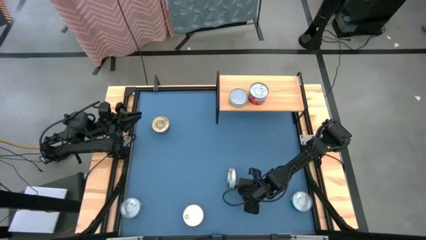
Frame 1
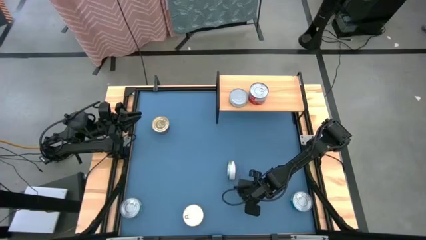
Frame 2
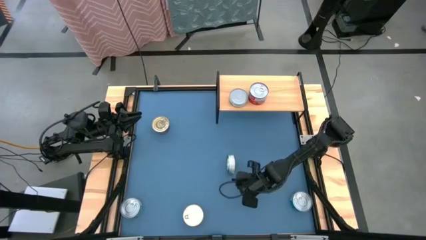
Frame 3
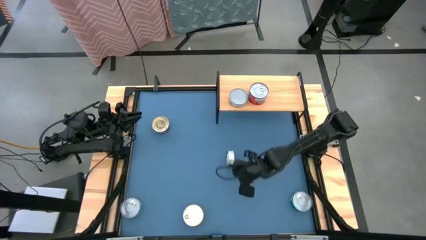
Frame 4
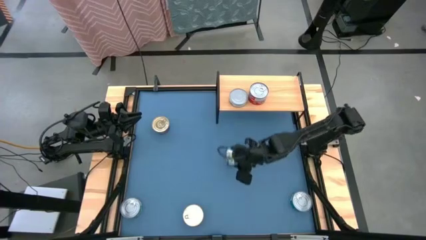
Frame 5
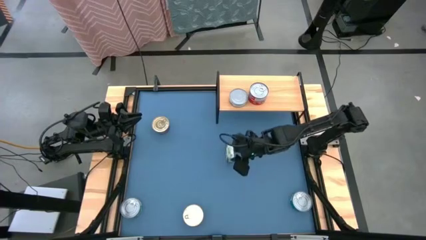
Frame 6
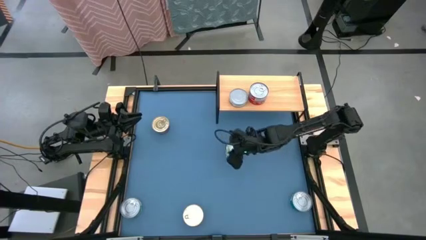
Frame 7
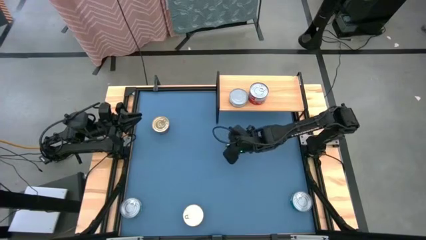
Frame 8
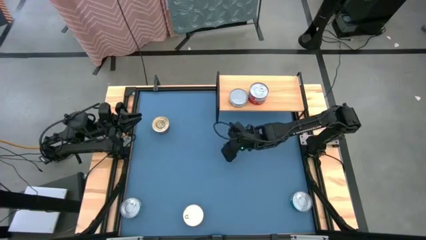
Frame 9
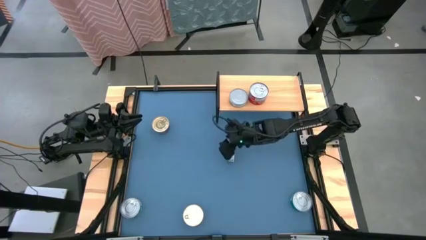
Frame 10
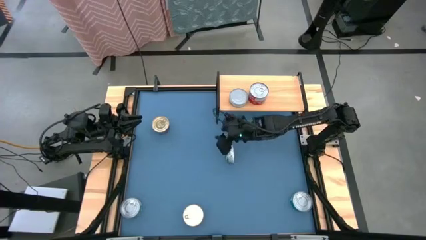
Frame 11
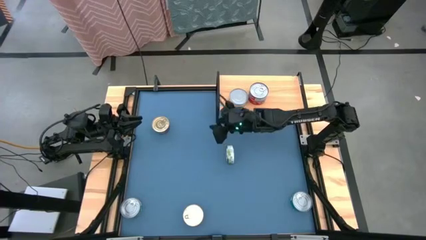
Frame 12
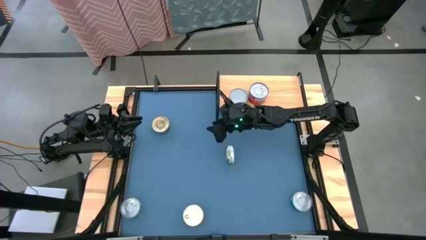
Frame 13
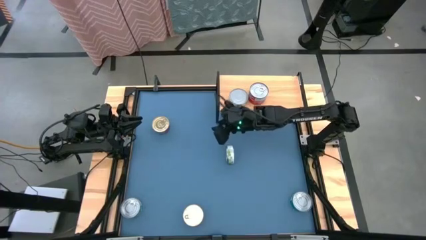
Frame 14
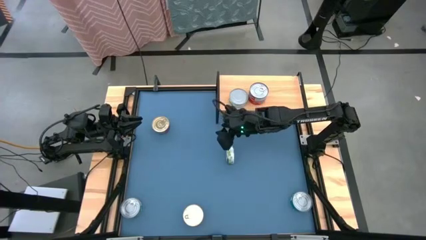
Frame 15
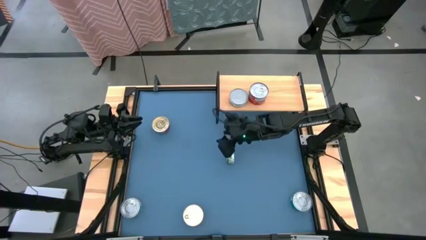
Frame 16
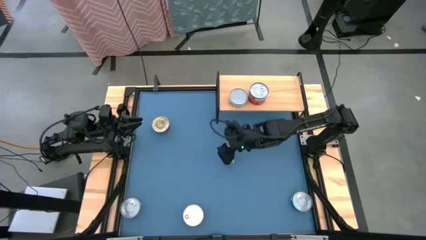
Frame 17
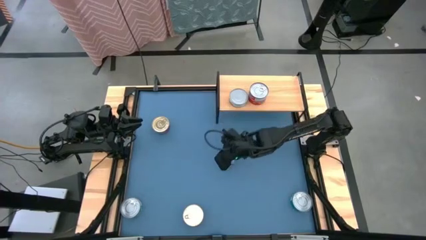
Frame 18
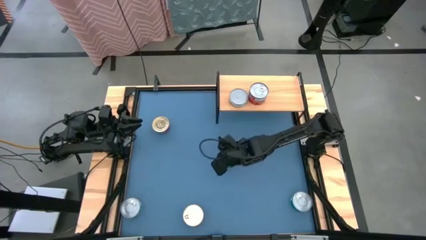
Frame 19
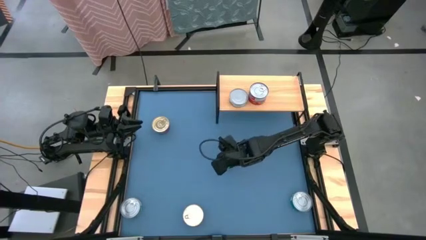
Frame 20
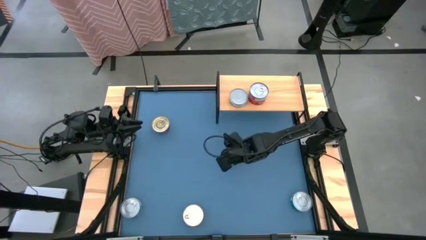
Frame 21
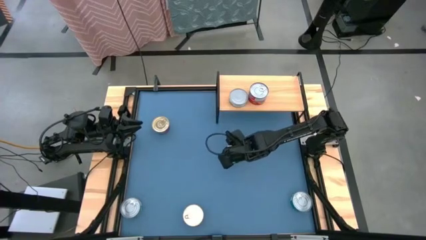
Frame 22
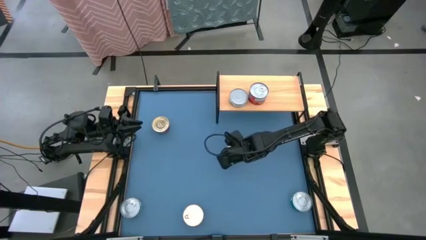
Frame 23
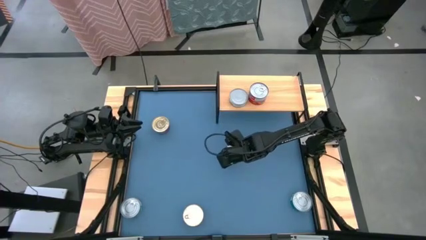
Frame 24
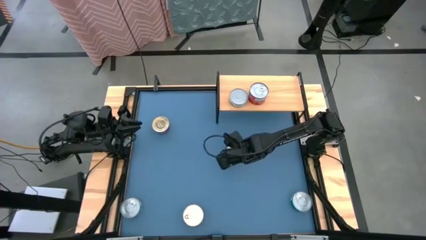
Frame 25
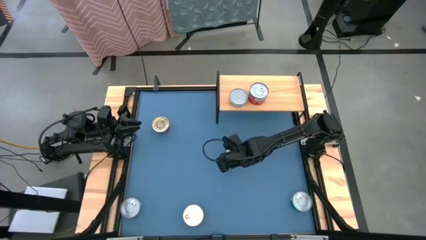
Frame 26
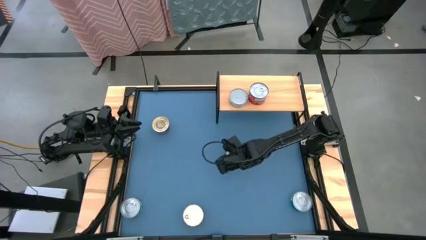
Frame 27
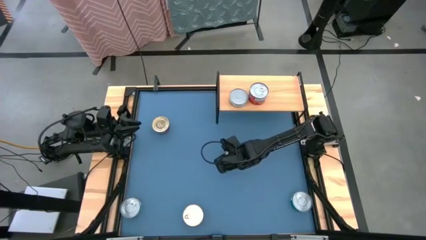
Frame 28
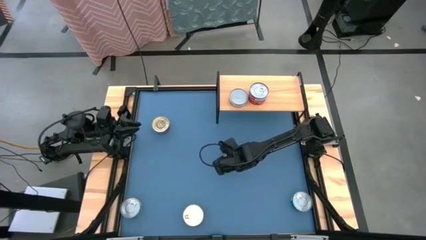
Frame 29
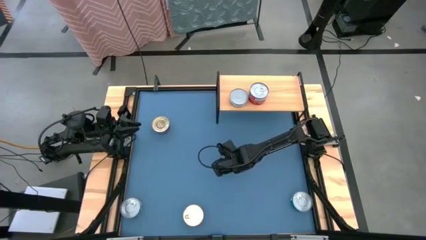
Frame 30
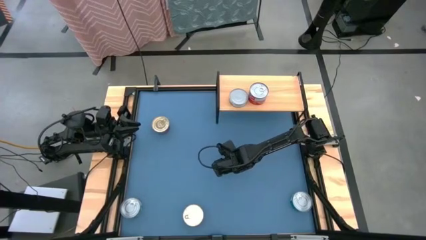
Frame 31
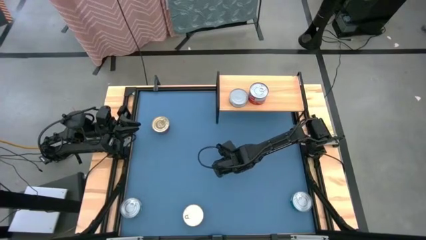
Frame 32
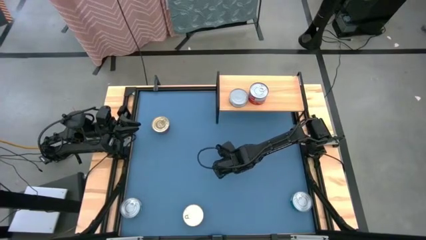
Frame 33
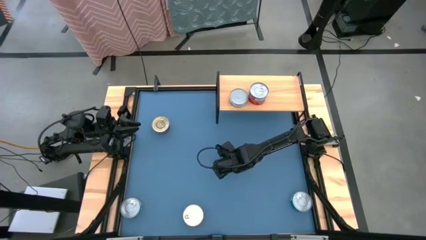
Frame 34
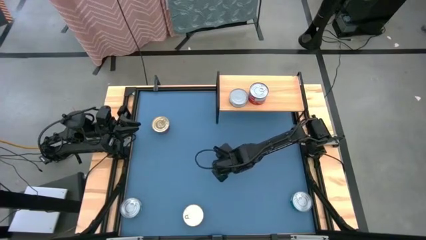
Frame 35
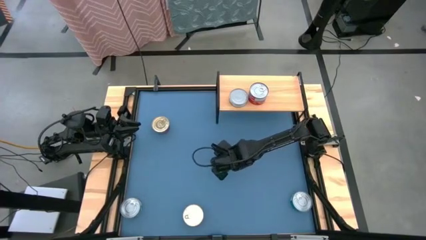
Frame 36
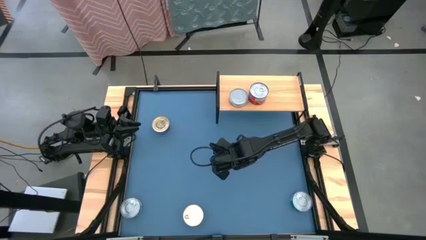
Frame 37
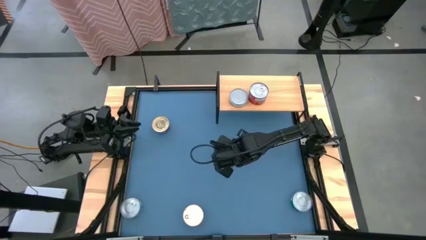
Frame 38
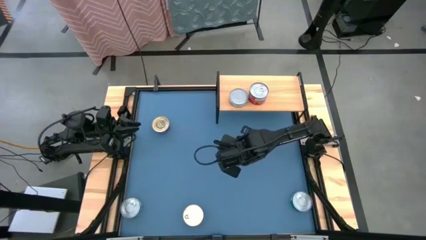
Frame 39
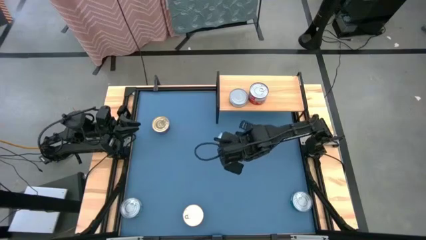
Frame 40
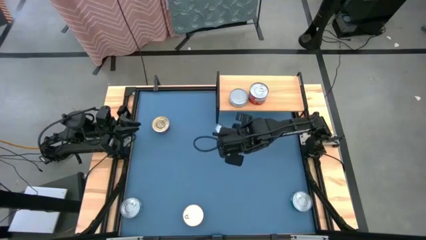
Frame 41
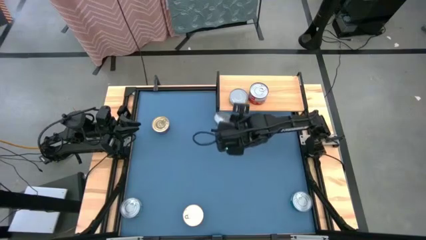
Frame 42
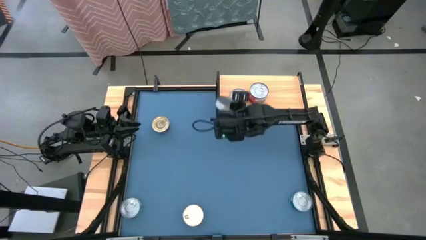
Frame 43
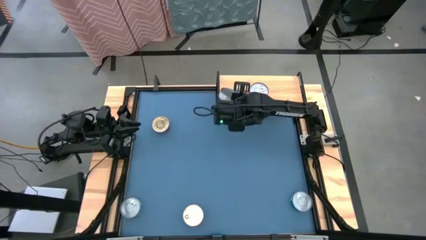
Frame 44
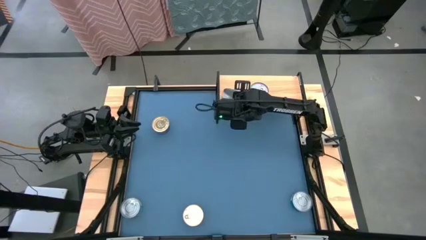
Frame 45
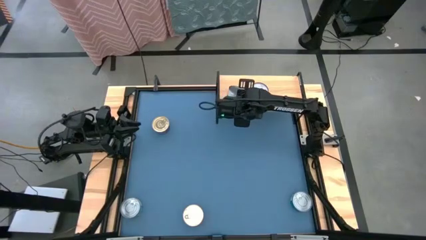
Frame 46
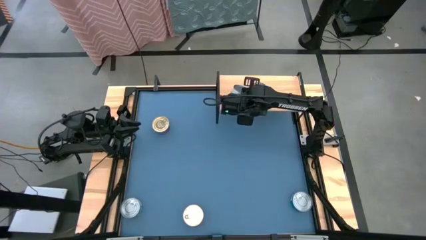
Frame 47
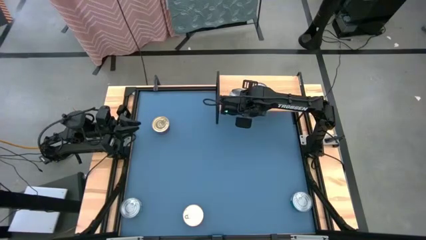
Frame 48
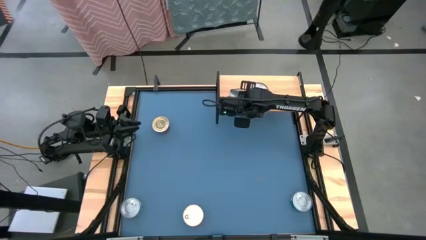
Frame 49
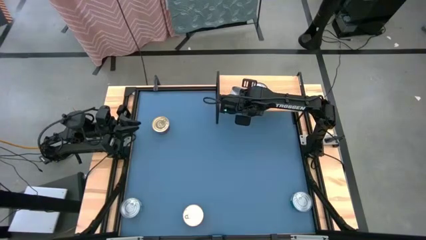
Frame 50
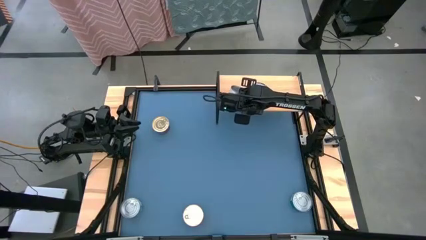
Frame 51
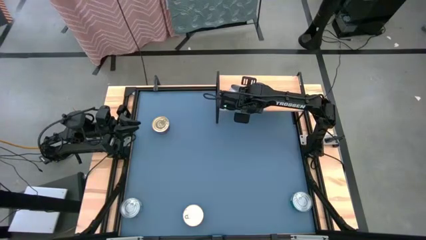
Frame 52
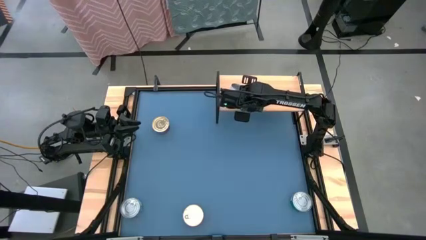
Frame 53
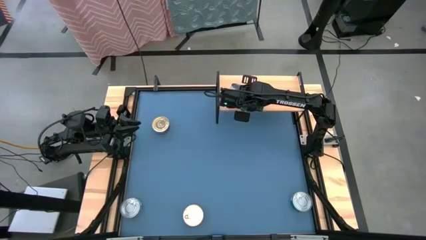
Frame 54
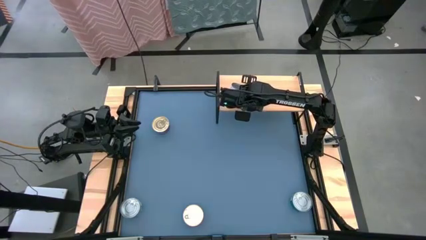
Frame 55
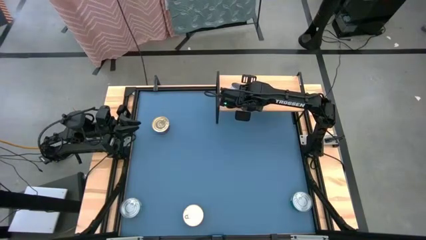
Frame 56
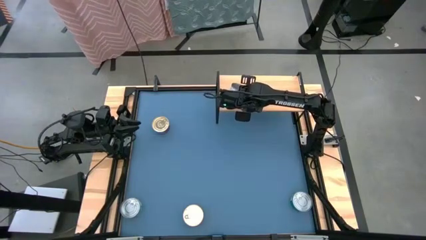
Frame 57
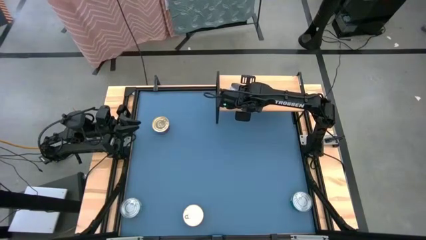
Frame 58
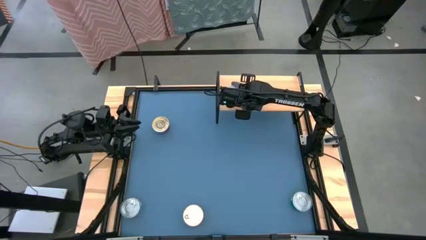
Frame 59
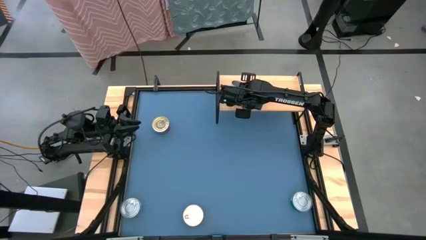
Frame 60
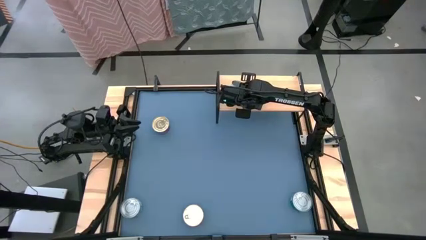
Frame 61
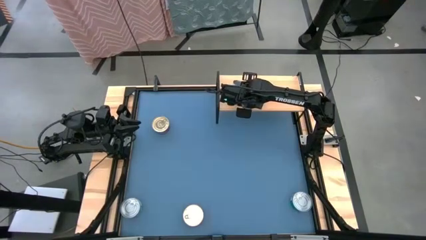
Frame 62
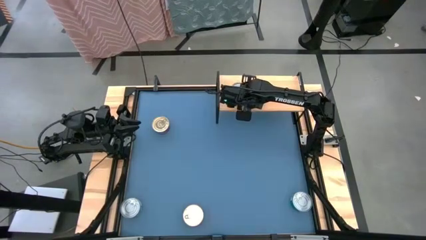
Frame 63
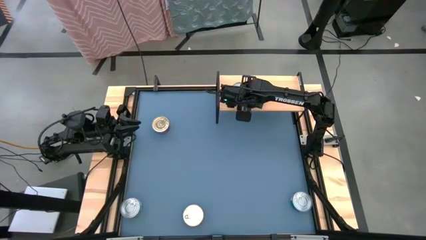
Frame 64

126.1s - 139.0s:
Task: Stack canned seafood by type on shelf
Stack the green tuna can on top of the white tuna can on the shelf

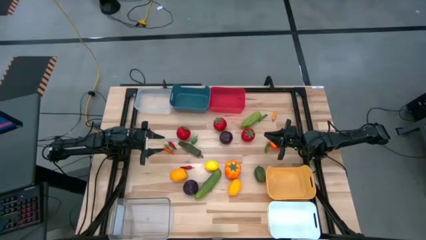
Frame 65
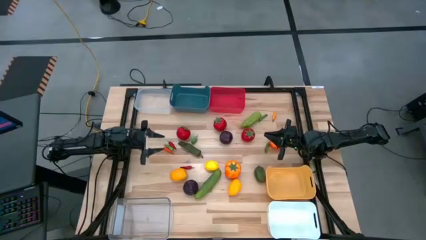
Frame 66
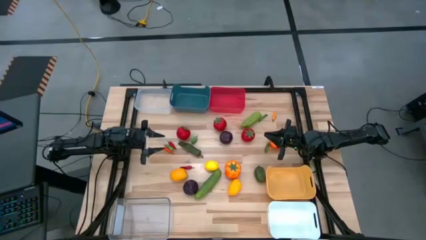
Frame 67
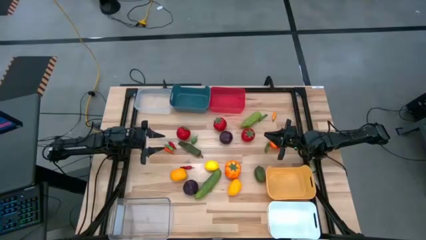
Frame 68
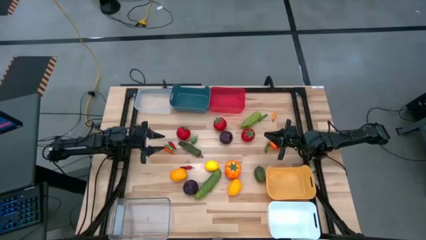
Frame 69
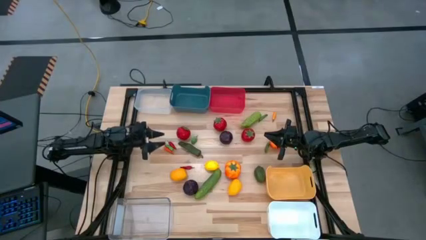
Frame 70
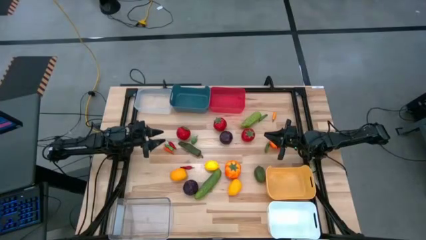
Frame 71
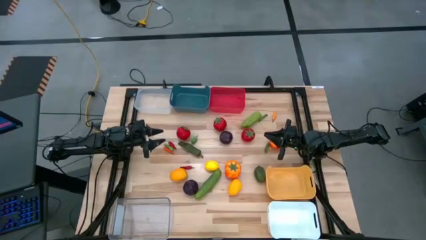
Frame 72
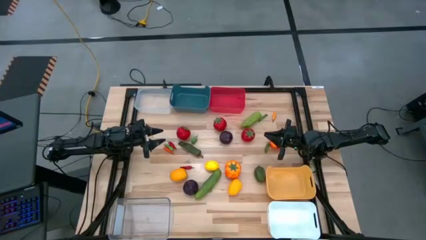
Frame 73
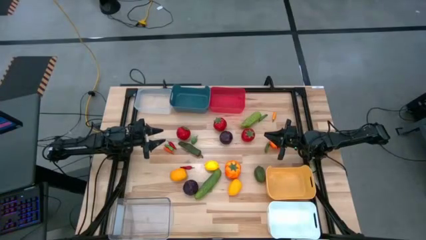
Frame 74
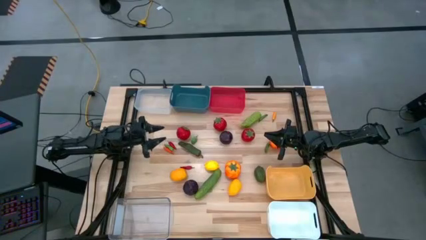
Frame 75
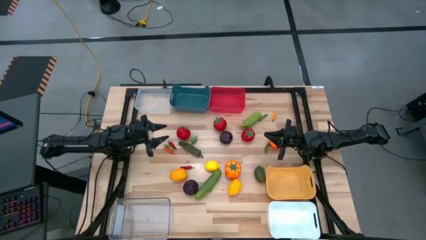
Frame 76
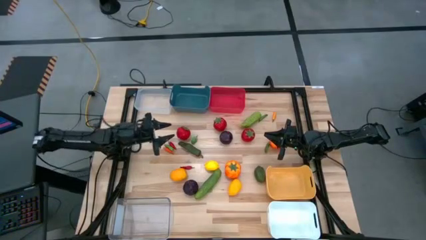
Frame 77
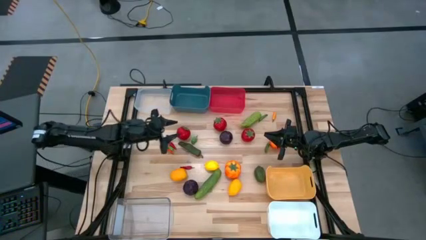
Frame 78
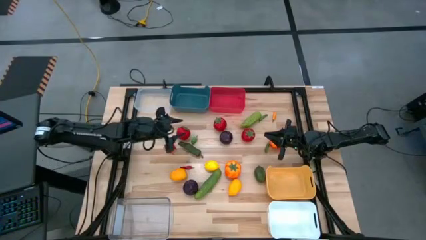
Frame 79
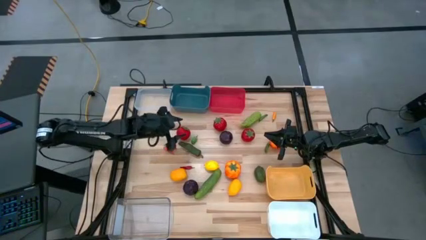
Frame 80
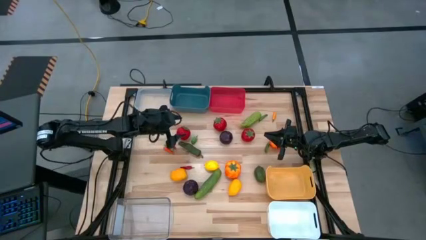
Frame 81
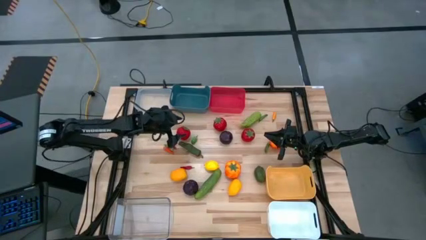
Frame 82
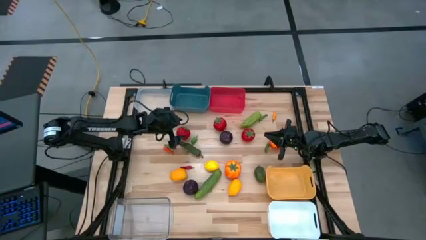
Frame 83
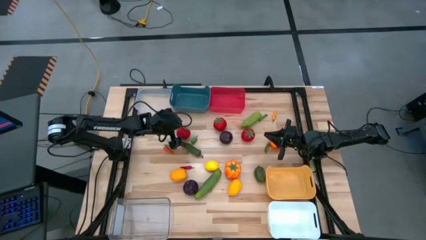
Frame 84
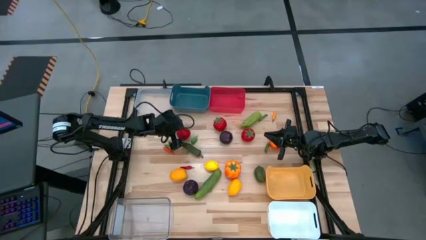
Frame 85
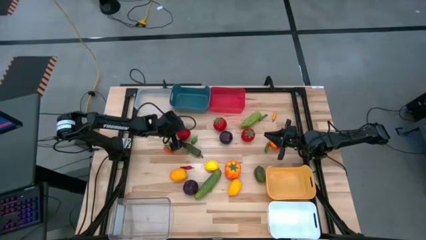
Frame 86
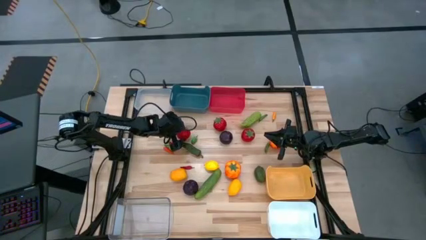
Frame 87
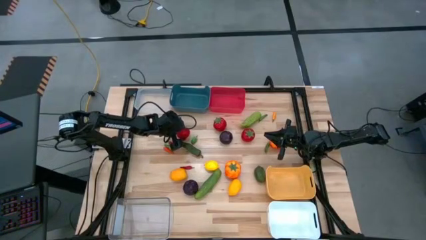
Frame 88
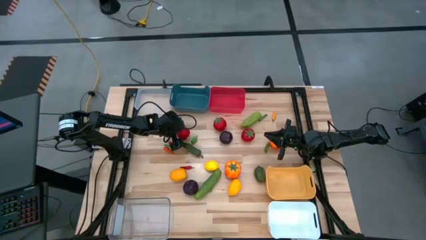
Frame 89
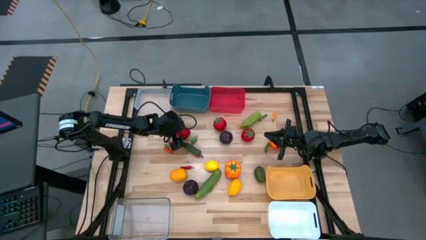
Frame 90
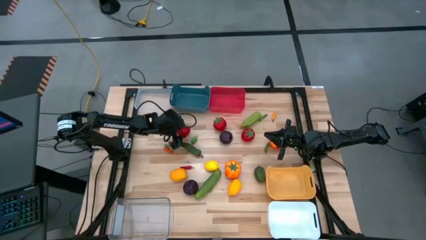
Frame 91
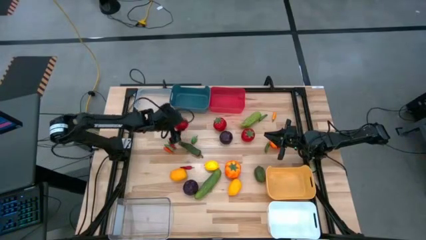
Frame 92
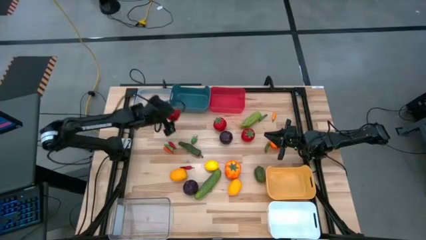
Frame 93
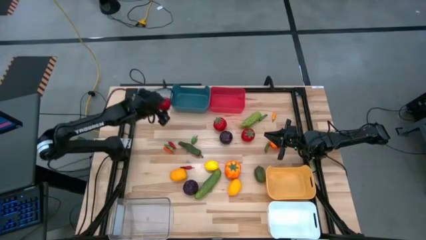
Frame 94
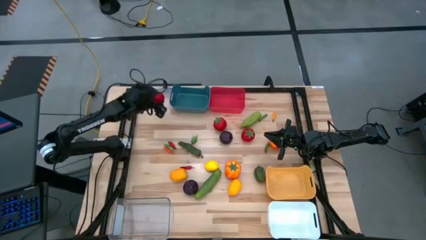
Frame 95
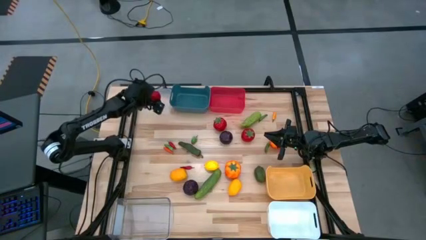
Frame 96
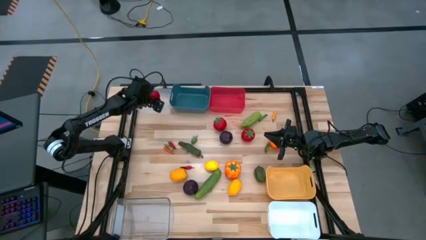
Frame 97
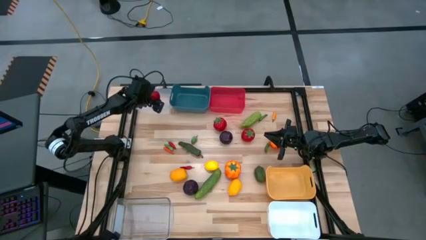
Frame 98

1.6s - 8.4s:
Task: Sort produce into baskets
Put the red tomato into the top transparent bin
